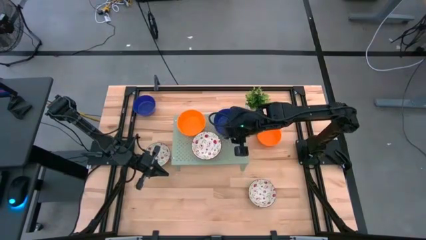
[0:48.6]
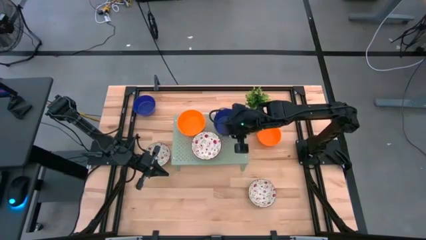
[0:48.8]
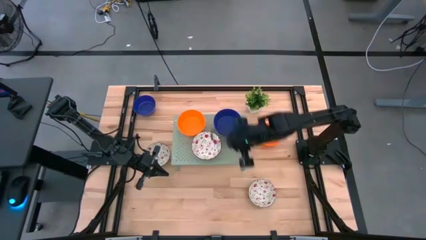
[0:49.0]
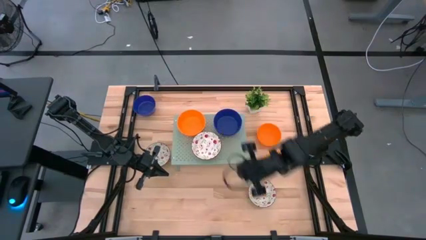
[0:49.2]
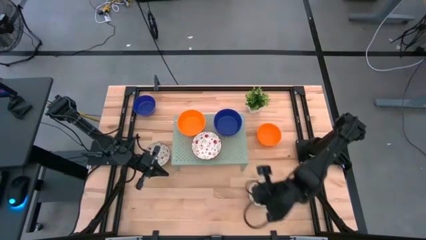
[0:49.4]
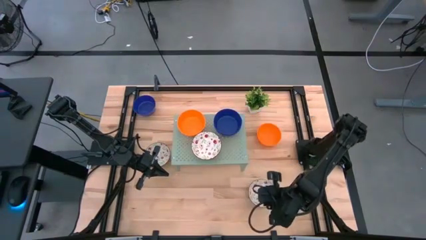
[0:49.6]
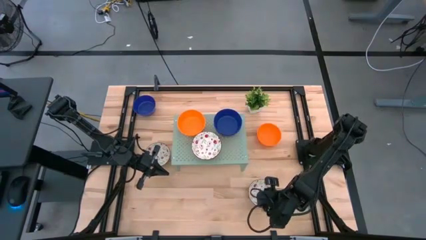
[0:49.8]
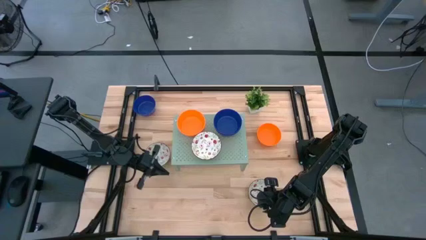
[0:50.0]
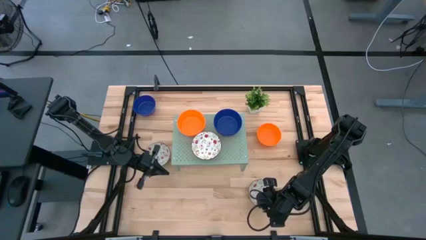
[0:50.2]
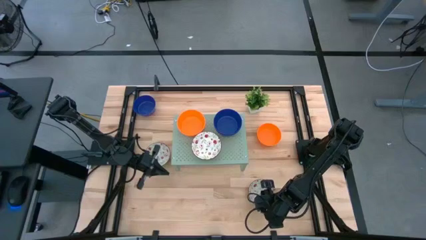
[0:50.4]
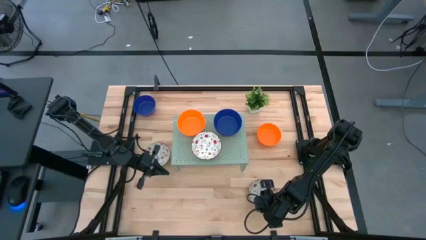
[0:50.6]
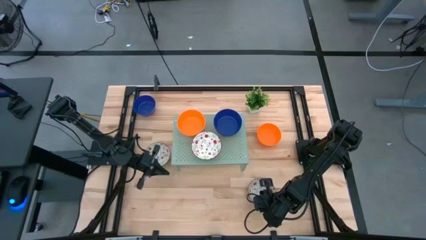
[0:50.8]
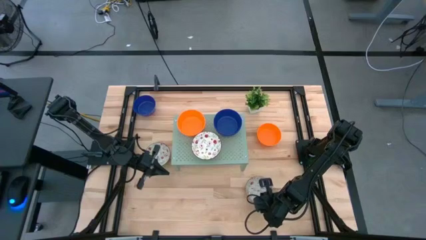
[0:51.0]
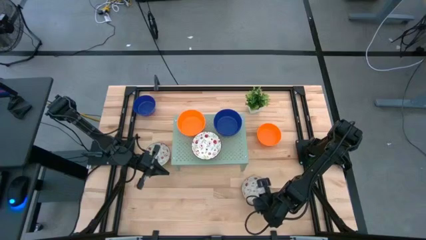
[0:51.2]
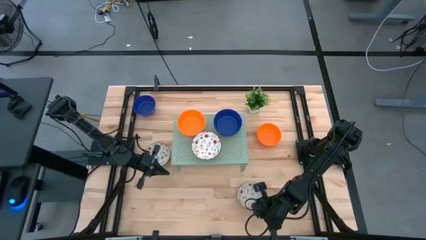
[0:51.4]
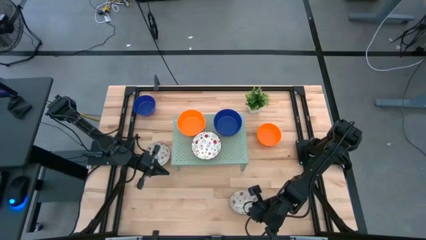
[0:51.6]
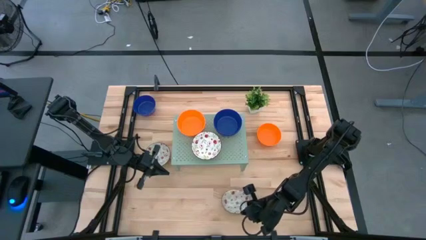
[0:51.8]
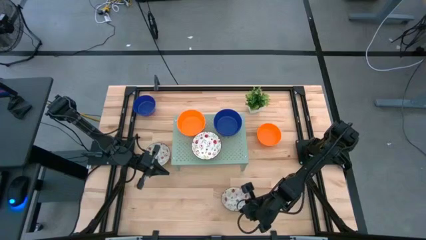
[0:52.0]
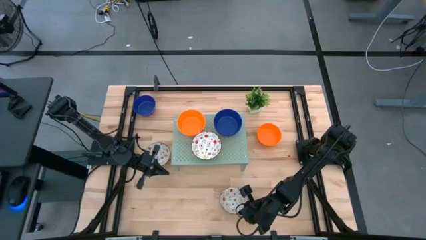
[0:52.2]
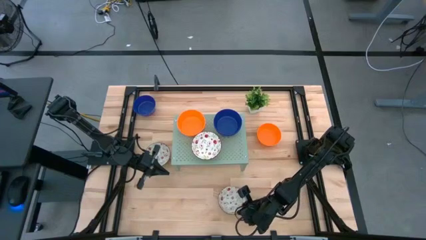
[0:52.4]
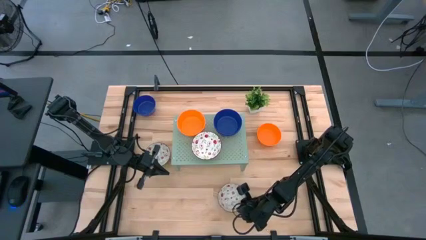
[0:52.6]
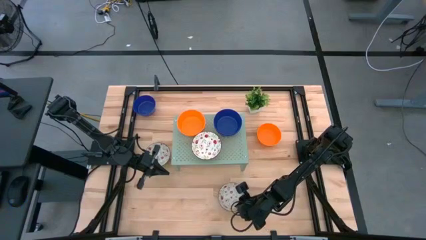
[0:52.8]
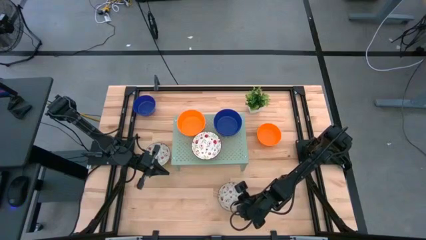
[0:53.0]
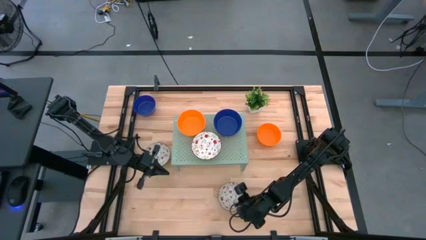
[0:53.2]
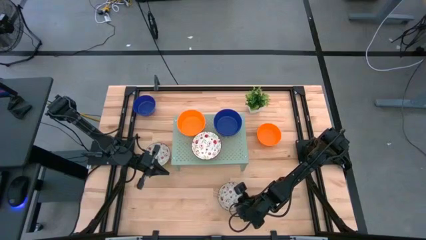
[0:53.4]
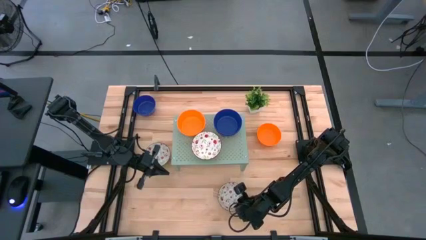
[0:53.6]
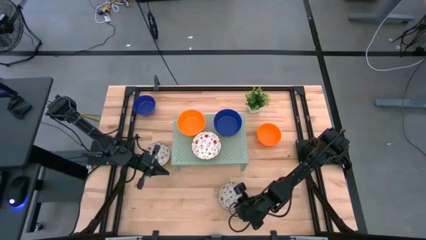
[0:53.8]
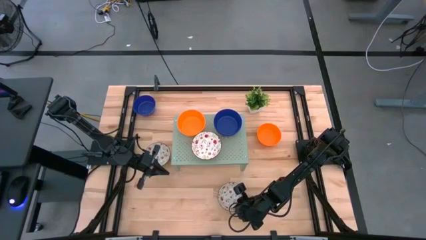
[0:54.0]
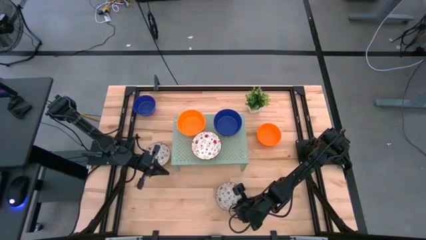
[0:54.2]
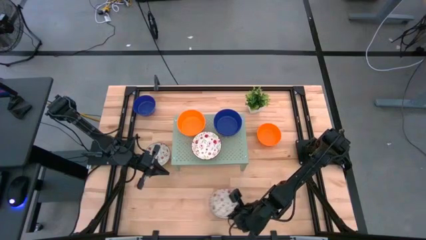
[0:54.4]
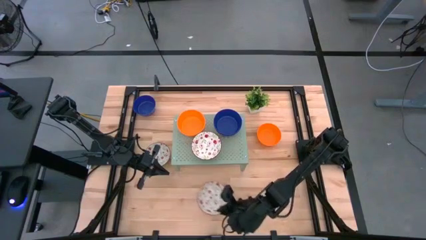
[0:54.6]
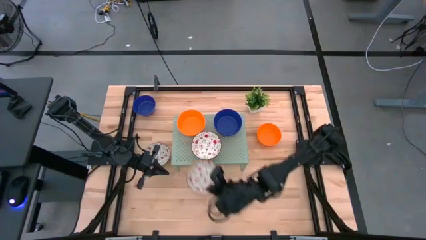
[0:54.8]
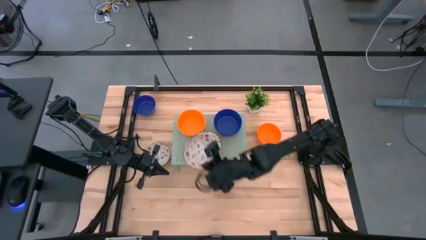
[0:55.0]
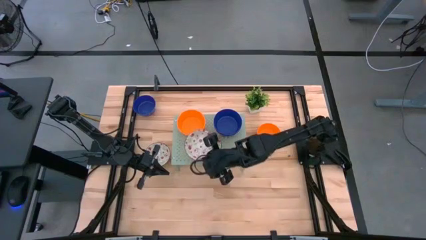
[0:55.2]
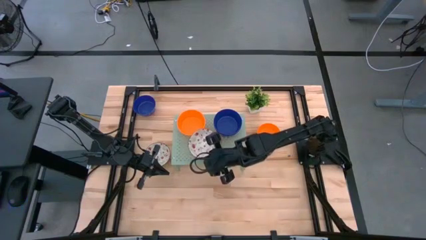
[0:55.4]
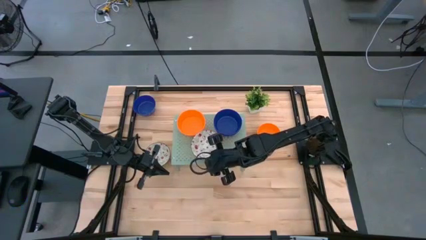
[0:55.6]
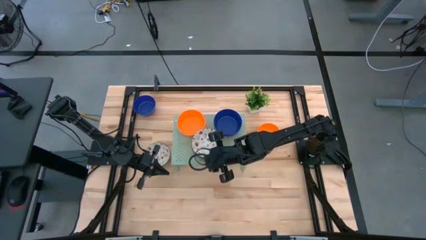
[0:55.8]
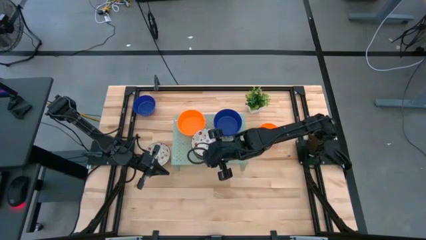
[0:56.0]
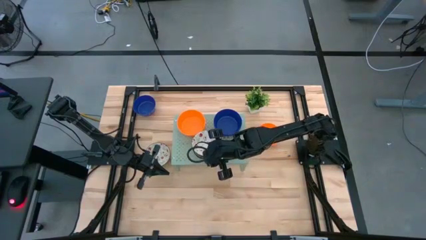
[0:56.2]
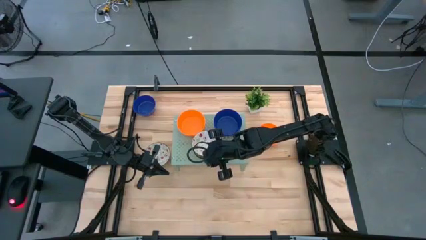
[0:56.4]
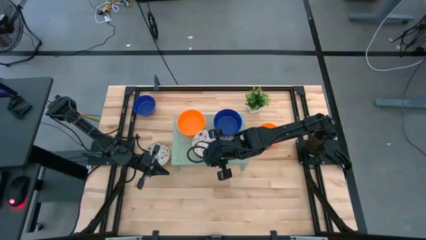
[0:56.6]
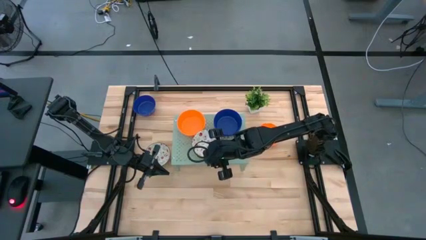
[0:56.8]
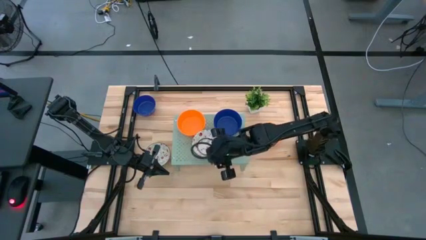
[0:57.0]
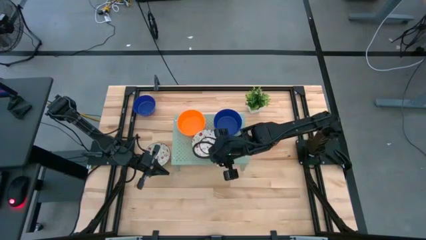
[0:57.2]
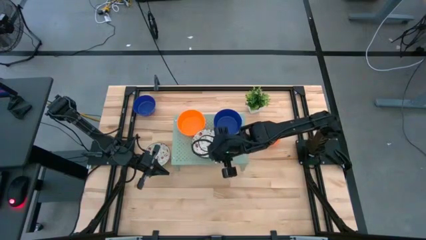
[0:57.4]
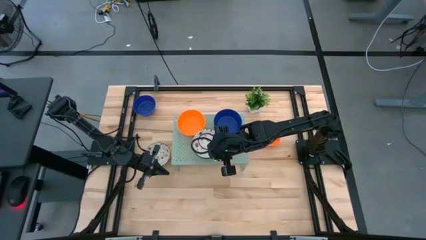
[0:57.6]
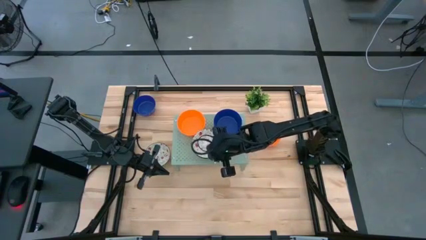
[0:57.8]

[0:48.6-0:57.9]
Task: Pick & Place Mini bowls
Stack the white patterned bowl on top of the white patterned bowl on the shelf

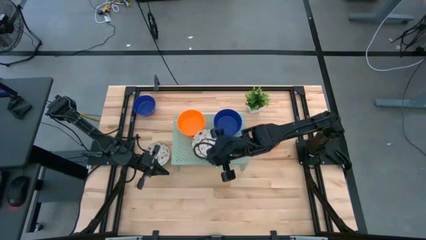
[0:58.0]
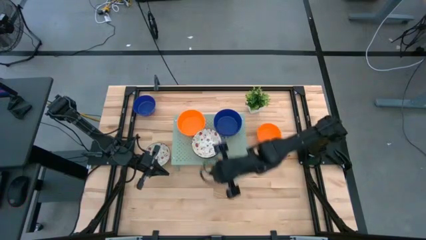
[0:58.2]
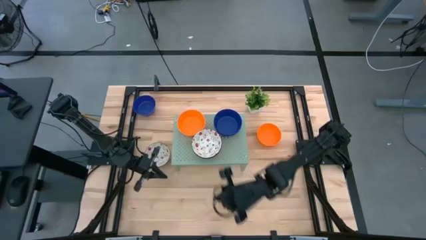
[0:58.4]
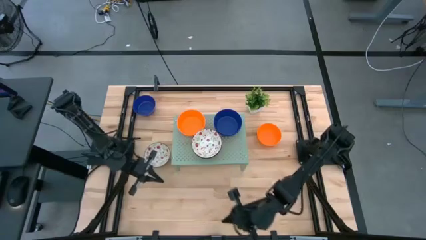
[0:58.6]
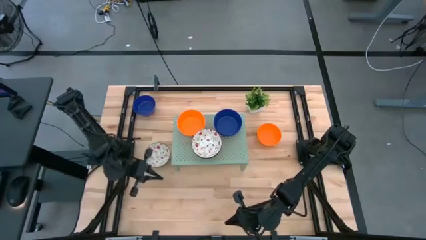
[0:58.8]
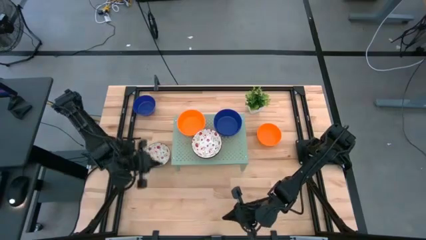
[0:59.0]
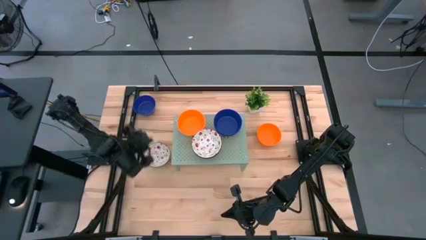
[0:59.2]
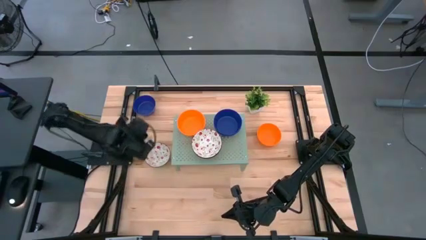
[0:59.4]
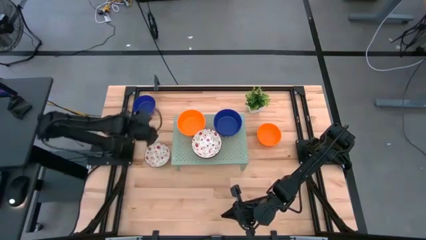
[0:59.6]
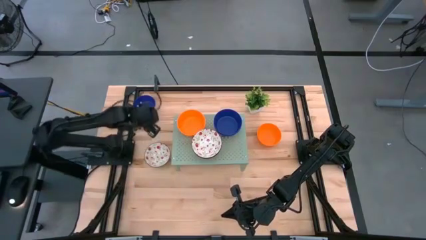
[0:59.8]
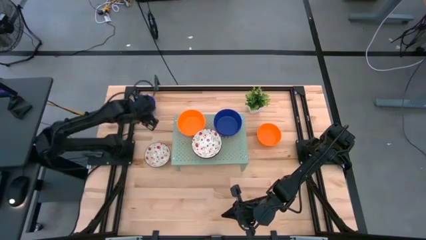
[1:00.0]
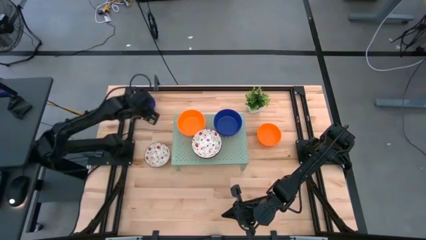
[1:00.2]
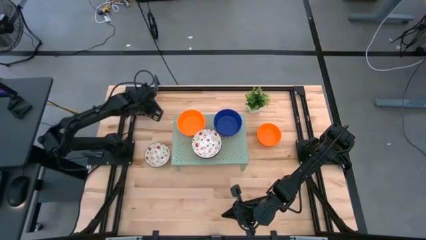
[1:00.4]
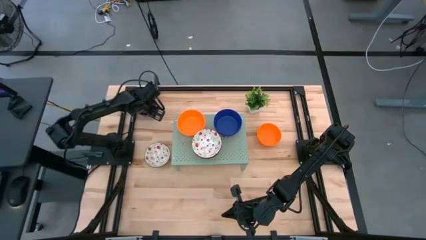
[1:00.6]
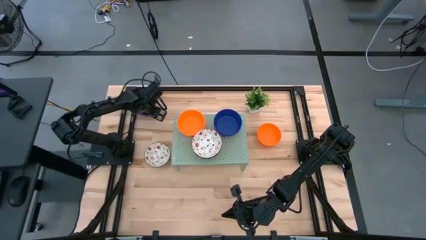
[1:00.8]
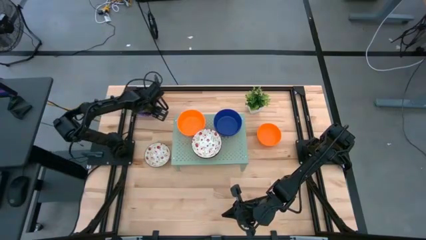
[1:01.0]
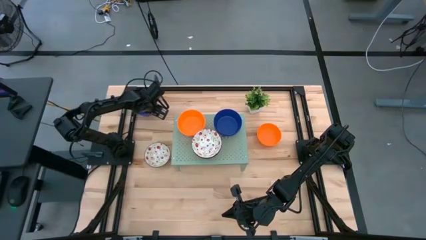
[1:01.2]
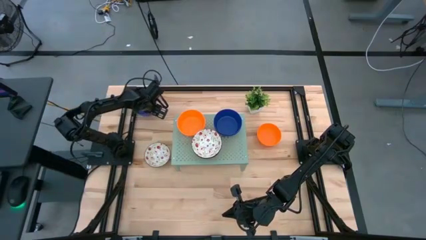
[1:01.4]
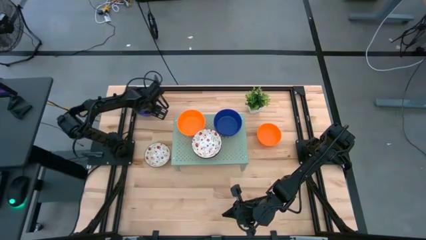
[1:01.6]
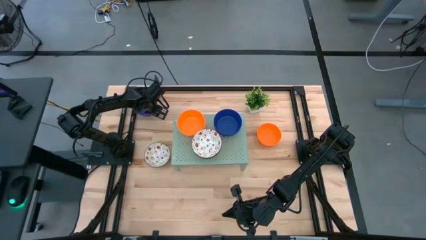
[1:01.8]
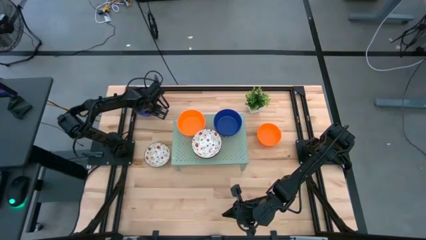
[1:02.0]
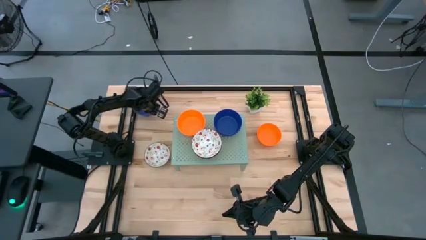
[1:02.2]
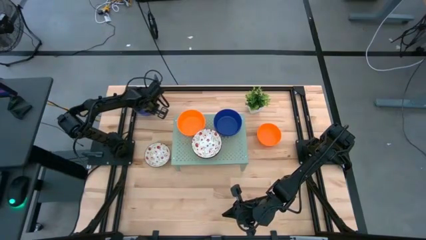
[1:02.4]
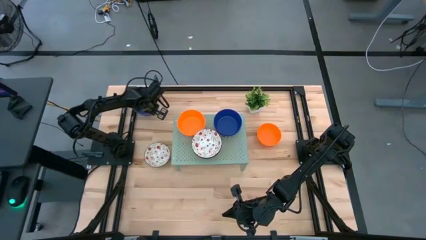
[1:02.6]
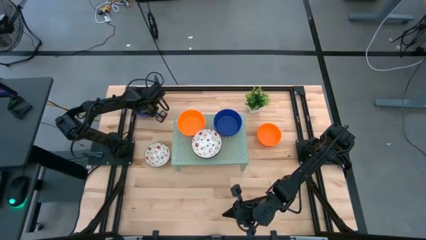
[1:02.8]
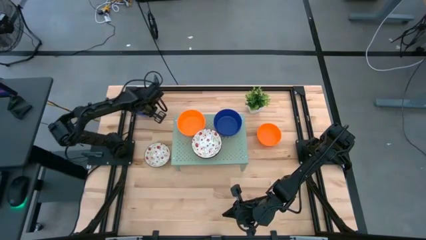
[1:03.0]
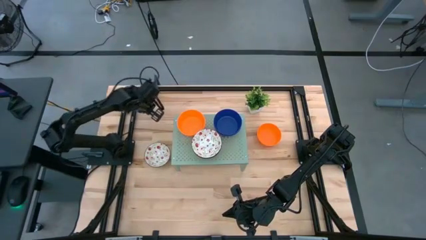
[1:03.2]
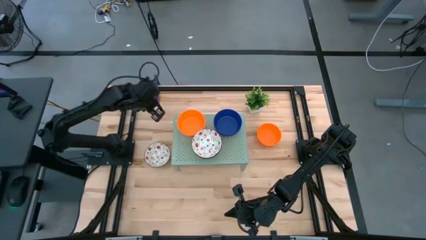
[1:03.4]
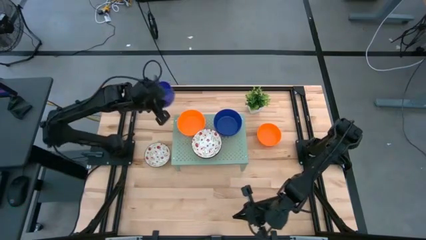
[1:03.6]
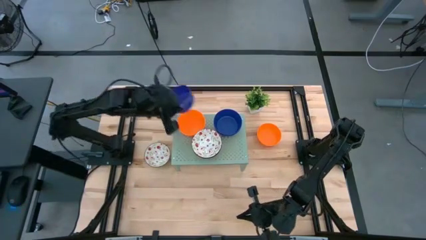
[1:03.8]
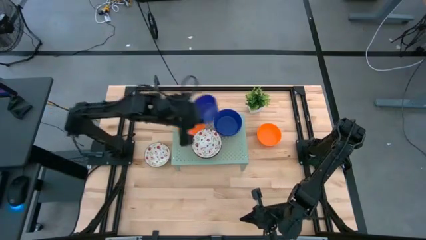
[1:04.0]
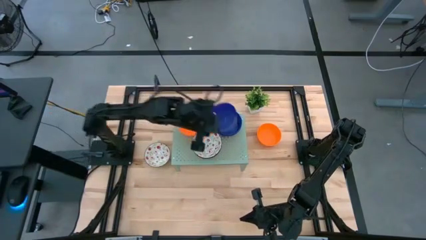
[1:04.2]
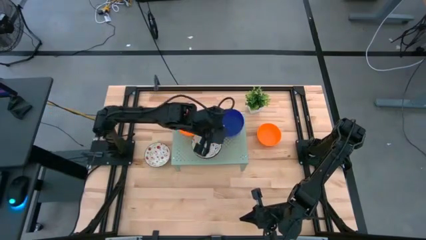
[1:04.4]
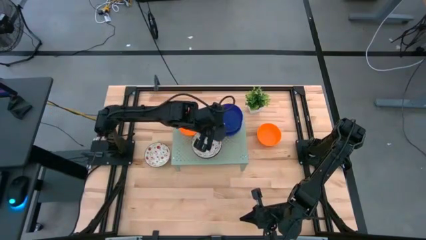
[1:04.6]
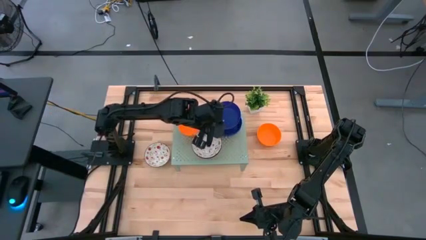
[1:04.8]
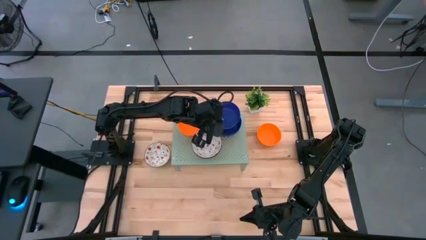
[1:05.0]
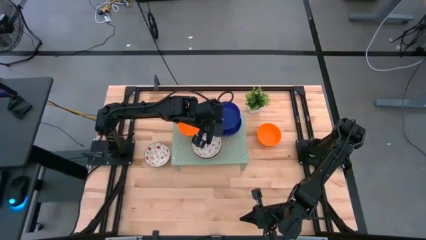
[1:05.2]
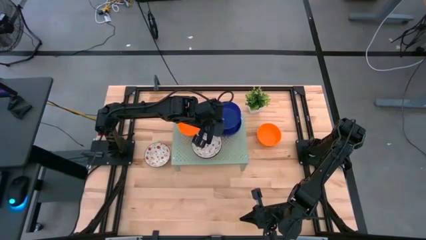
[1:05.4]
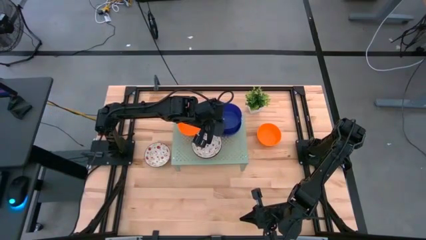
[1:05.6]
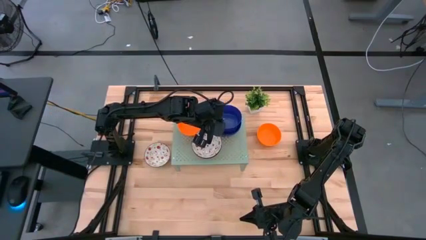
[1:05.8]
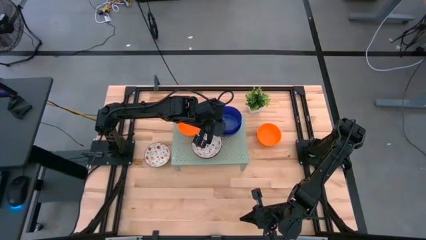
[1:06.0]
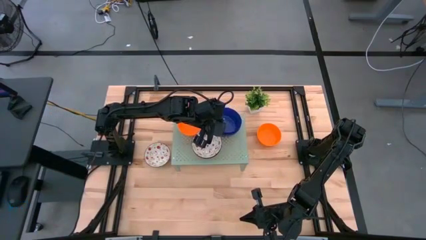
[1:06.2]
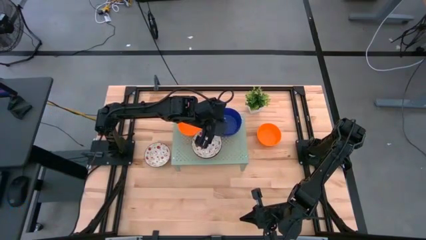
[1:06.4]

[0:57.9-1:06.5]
Stack the blue bowl on top of the blue bowl on the shelf
